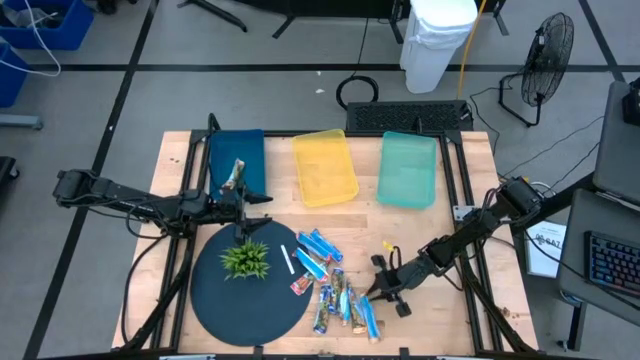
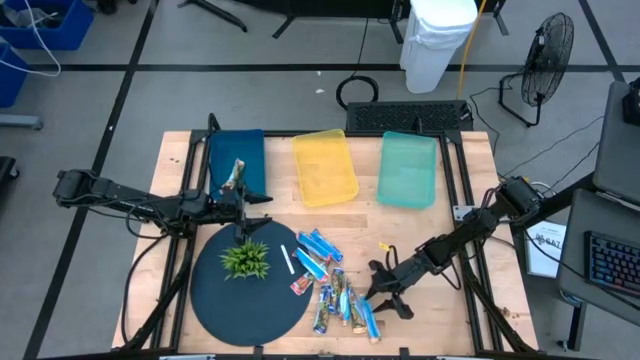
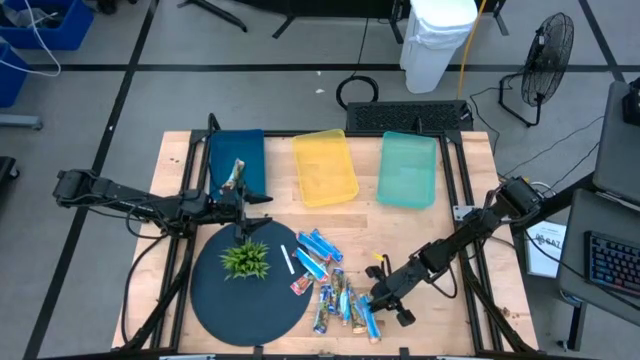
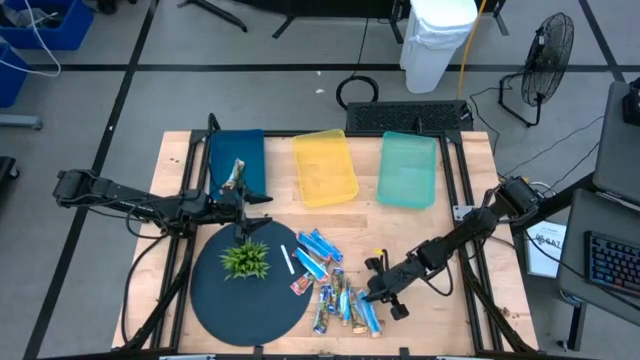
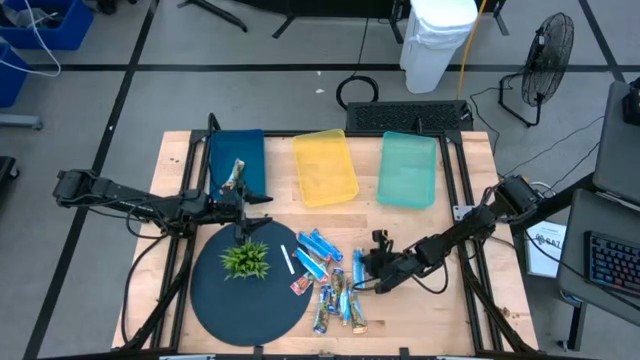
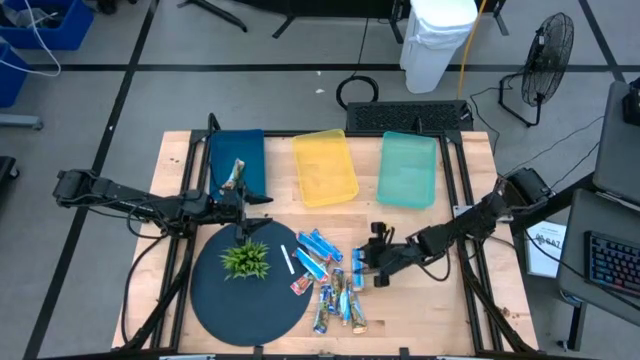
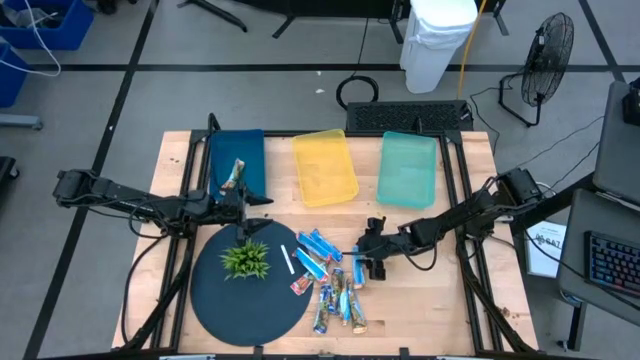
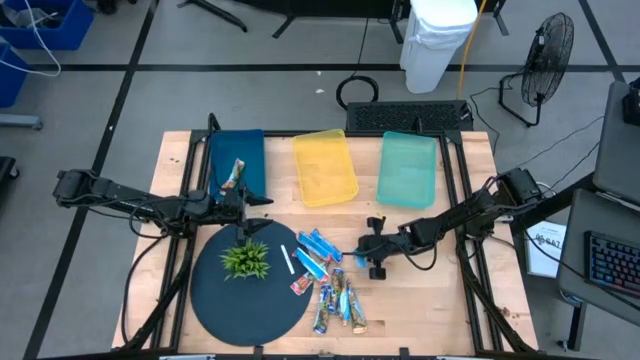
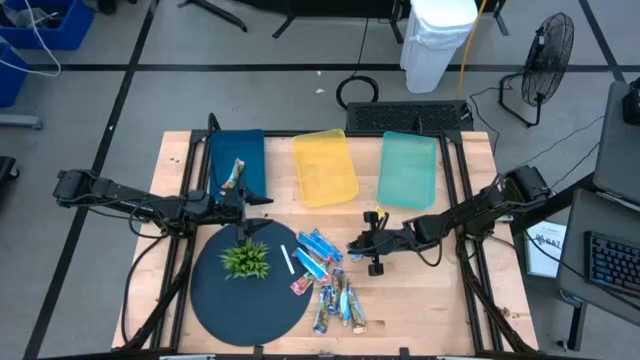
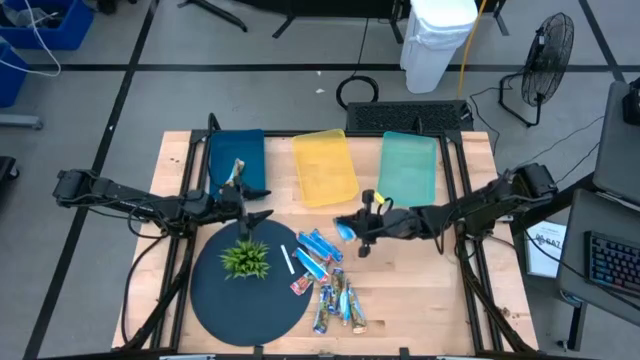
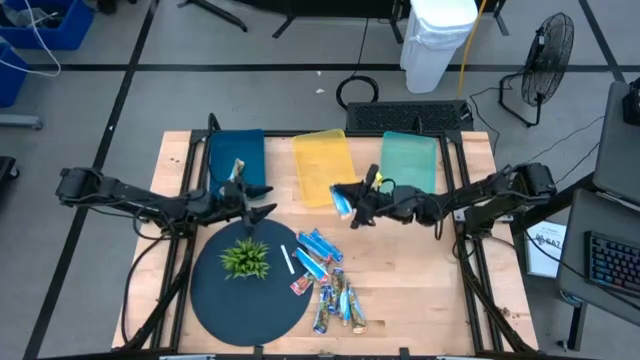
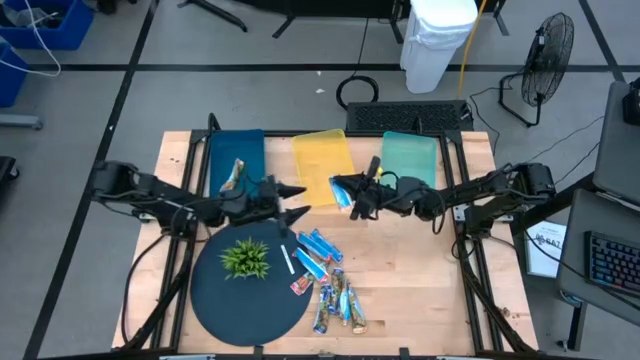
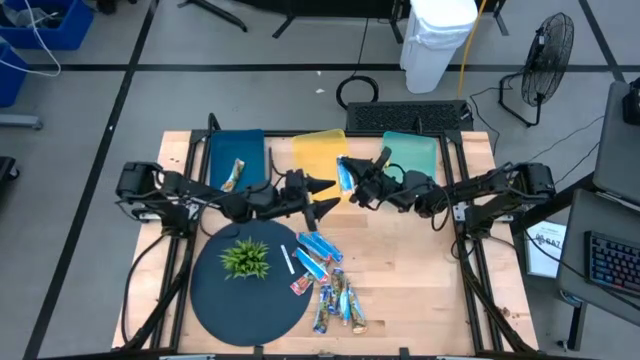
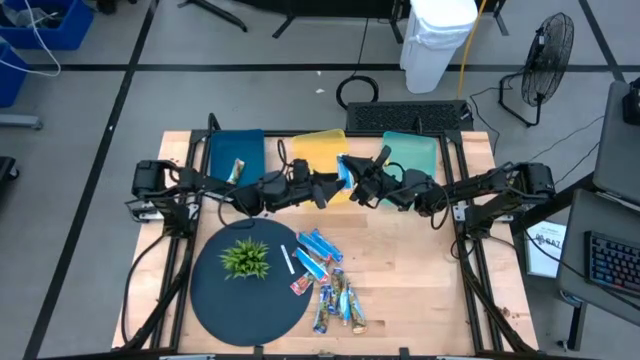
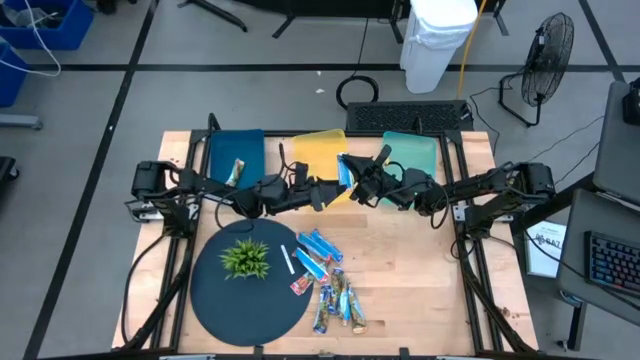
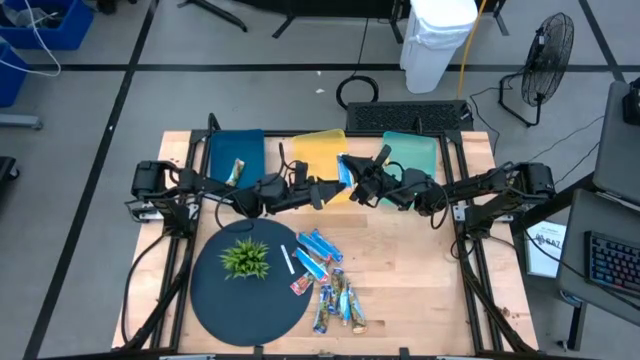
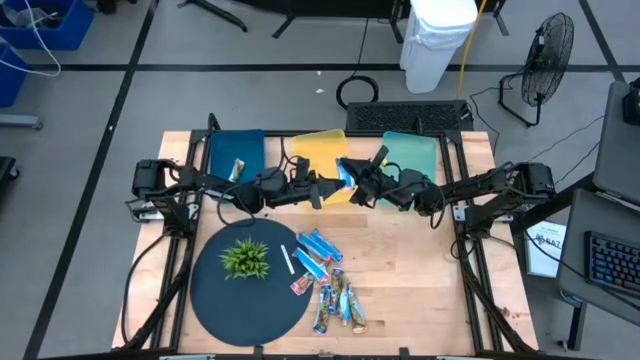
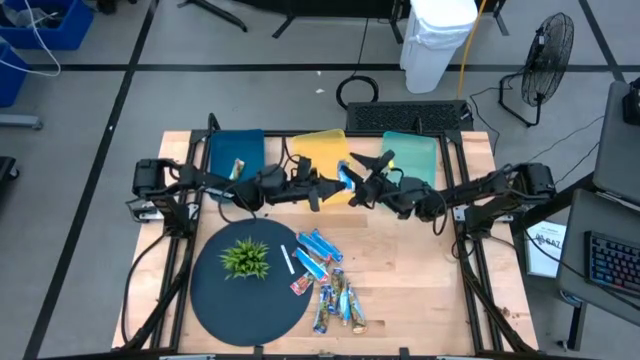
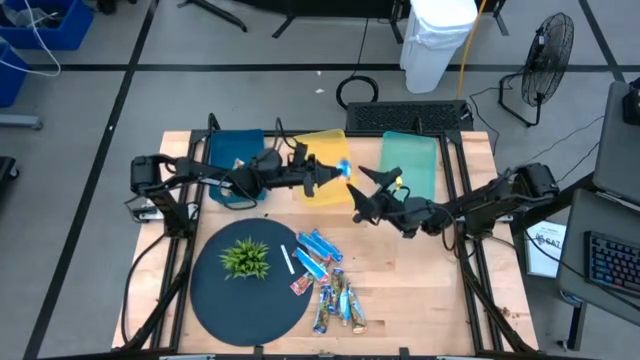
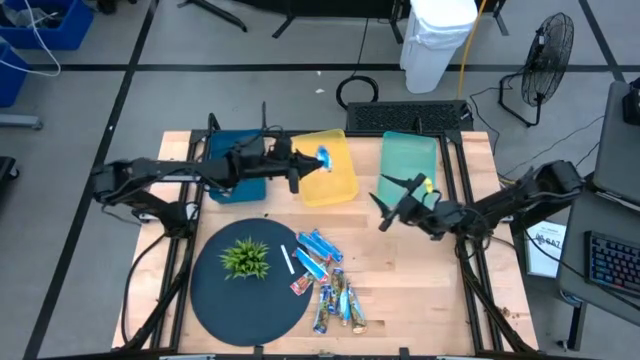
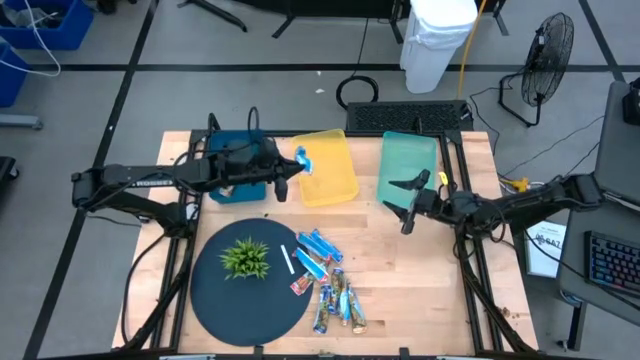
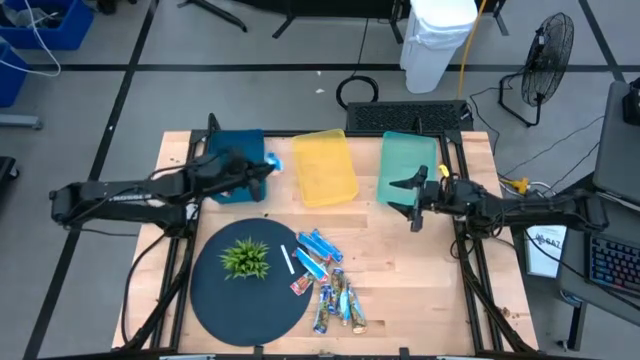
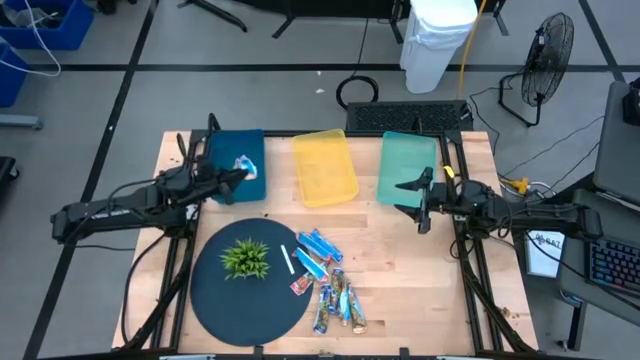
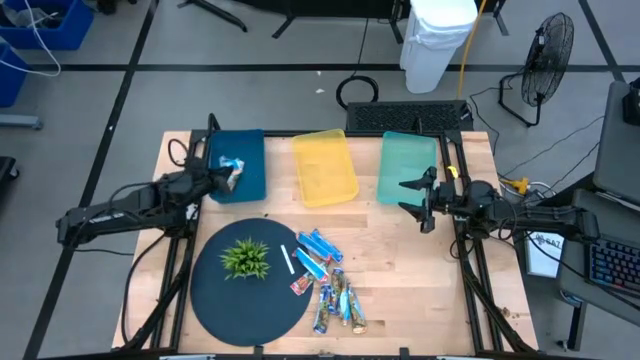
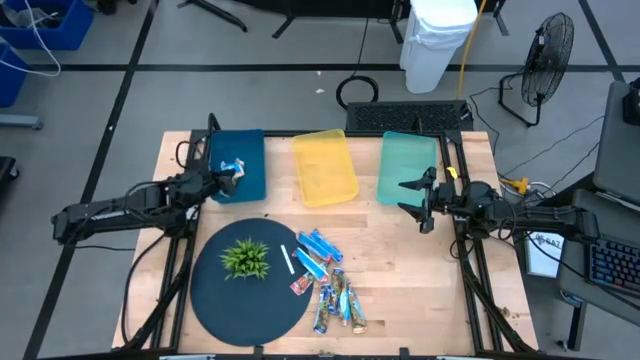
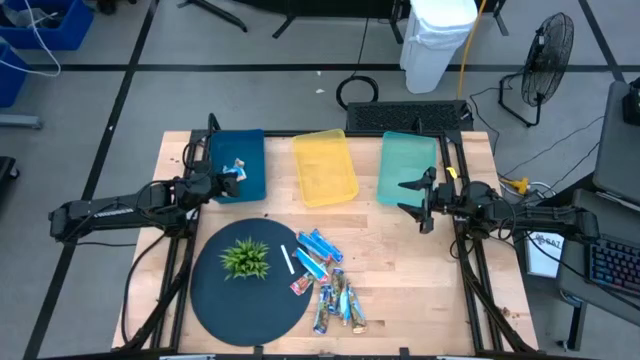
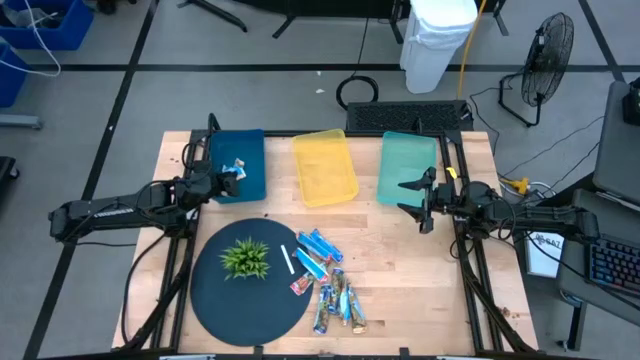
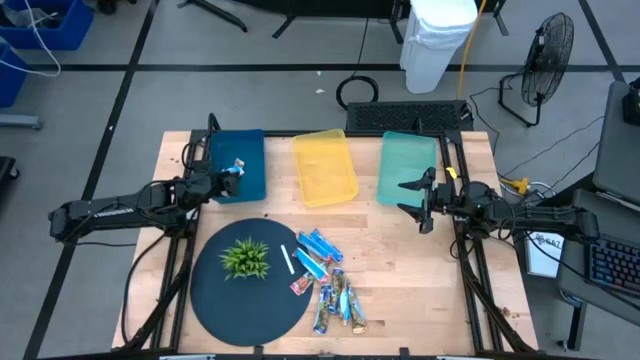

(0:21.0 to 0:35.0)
Task: Pick and place Granola Bars by type
Put the yellow granola bar into the blue bin

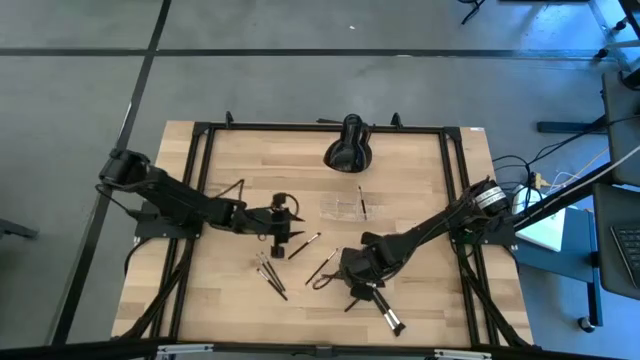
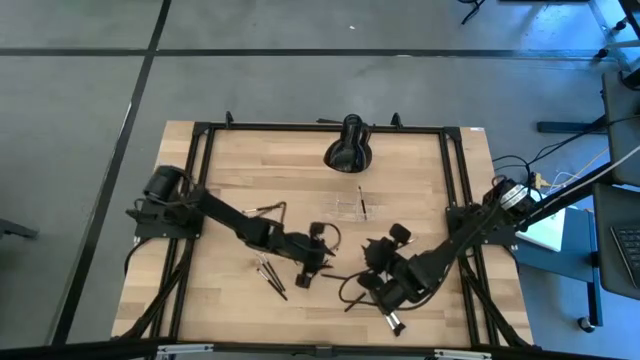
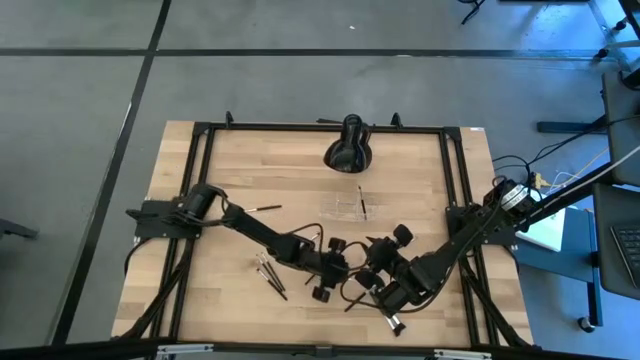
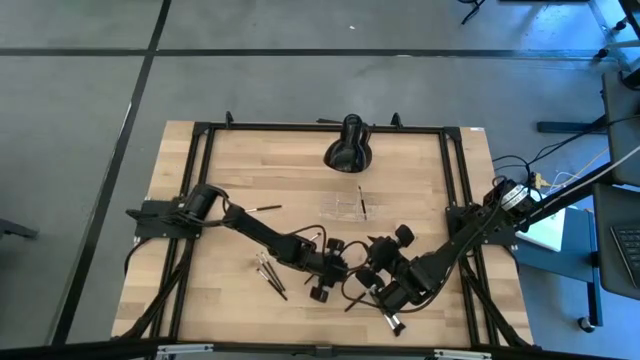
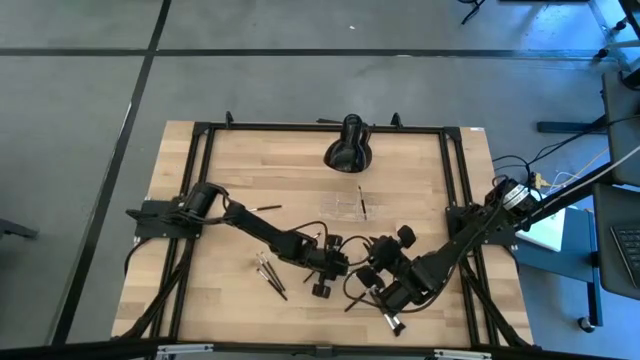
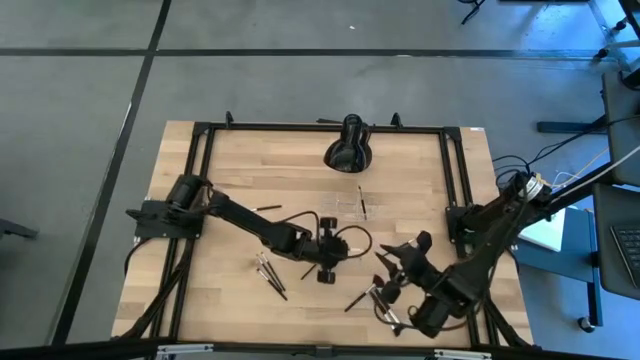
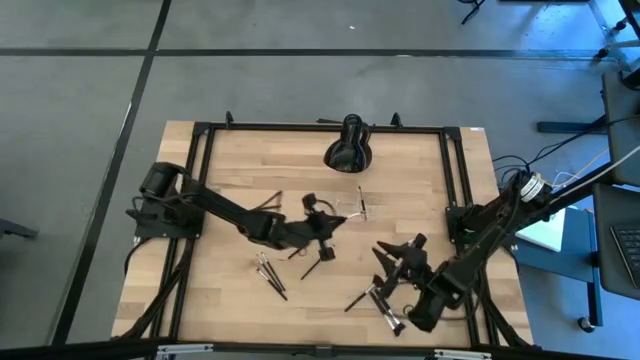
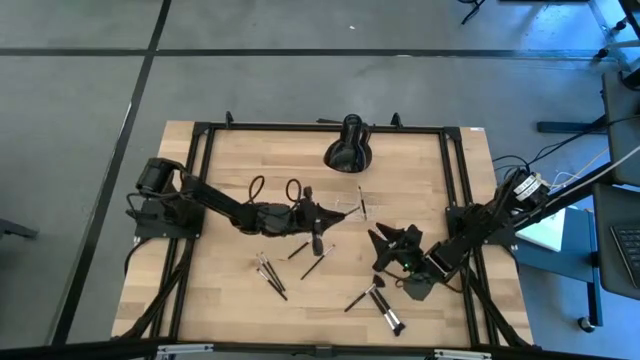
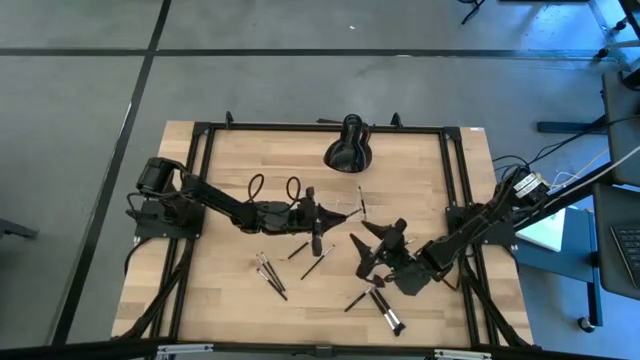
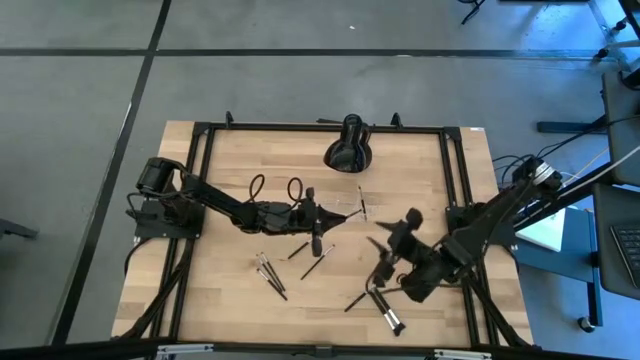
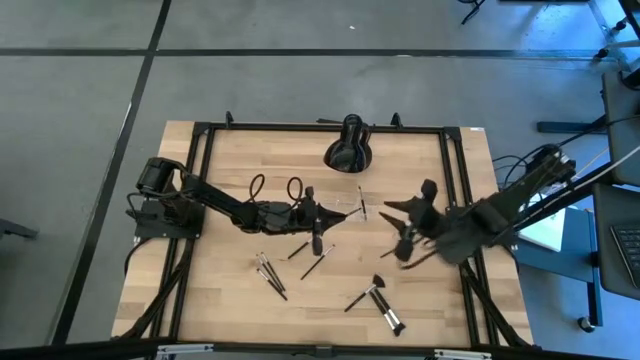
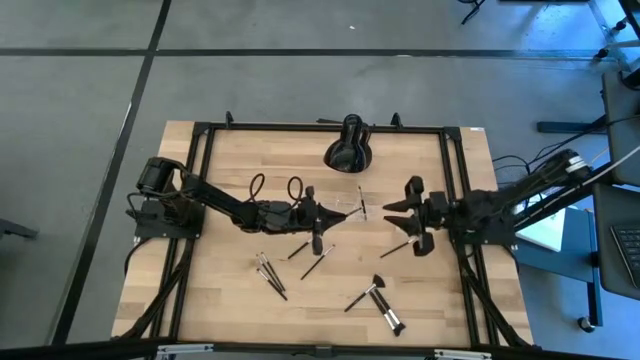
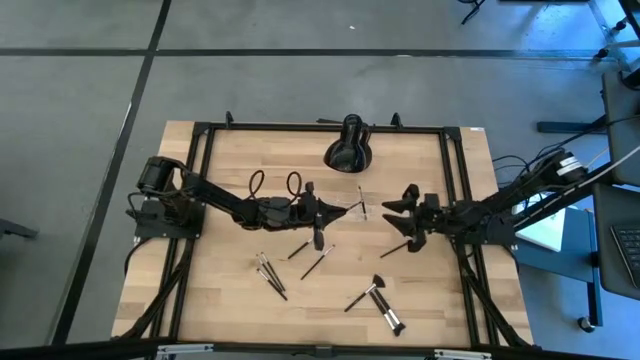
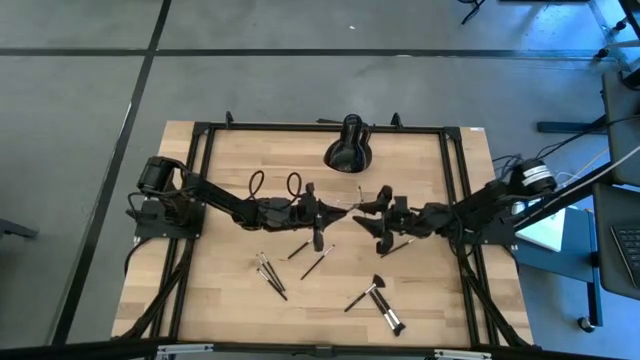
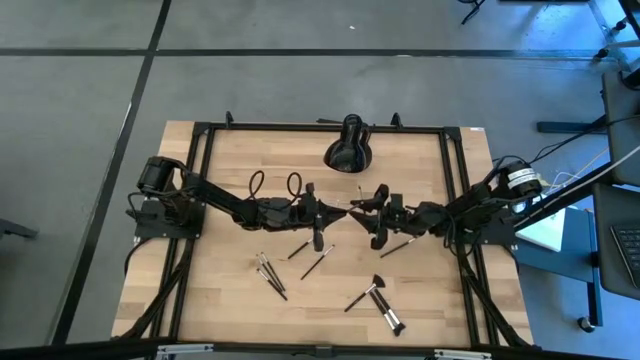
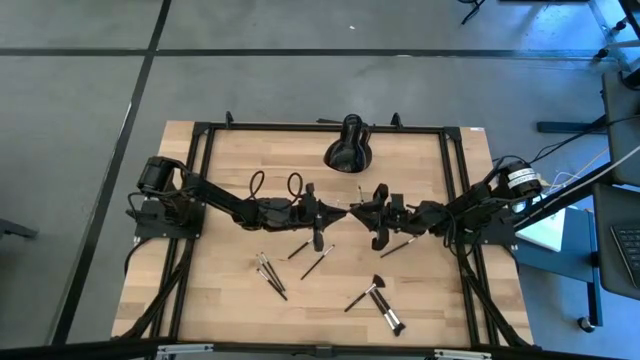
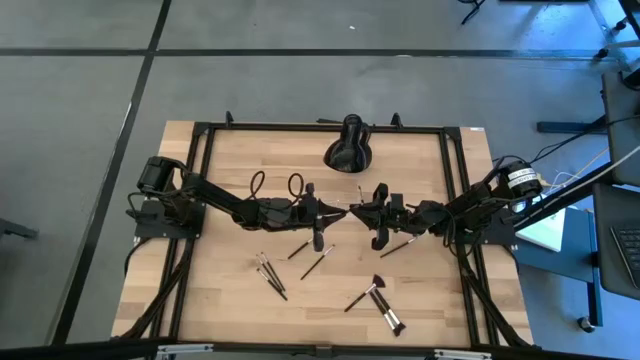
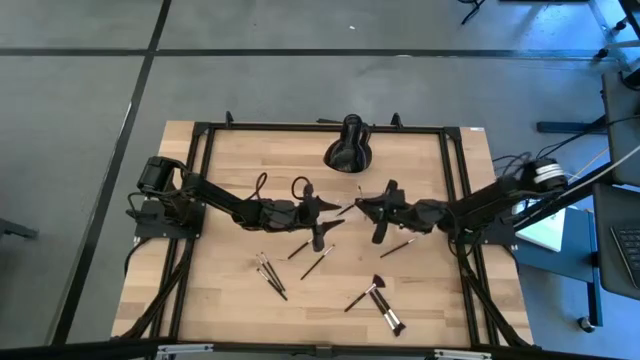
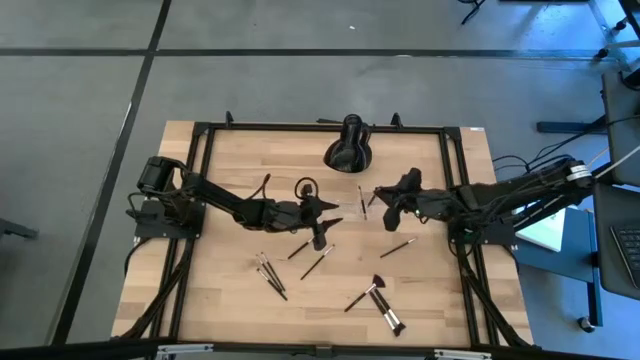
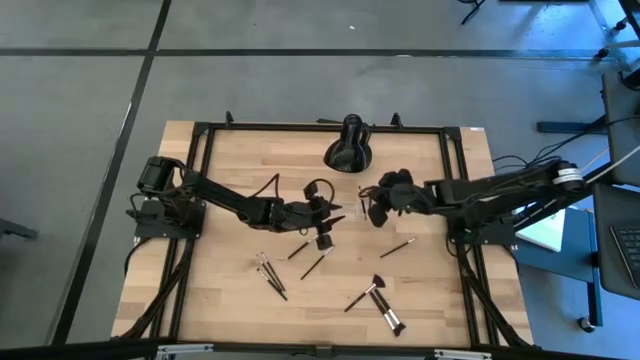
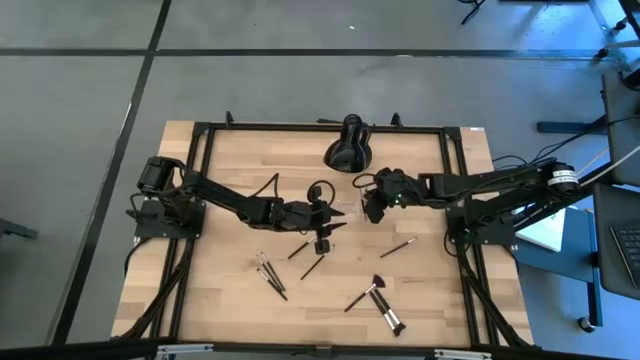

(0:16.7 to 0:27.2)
Task: Pick & Place Makeup Supplies
Put the makeup brush into the transparent organizer
